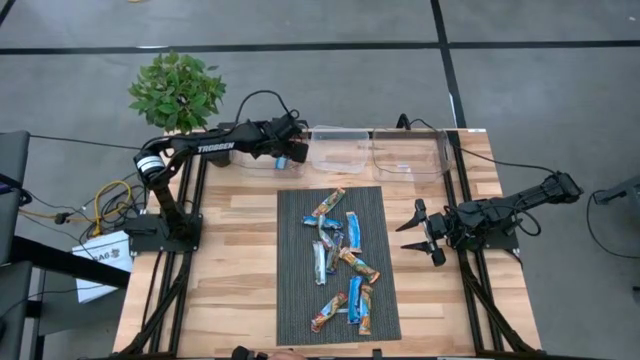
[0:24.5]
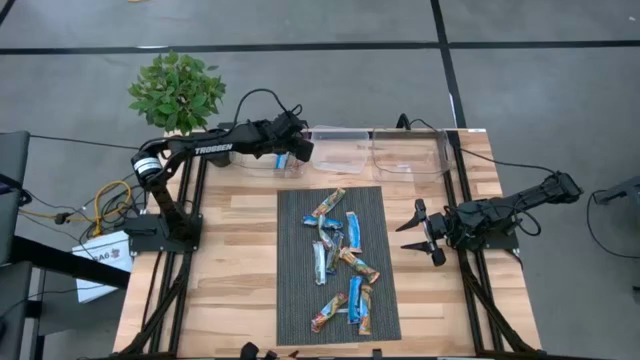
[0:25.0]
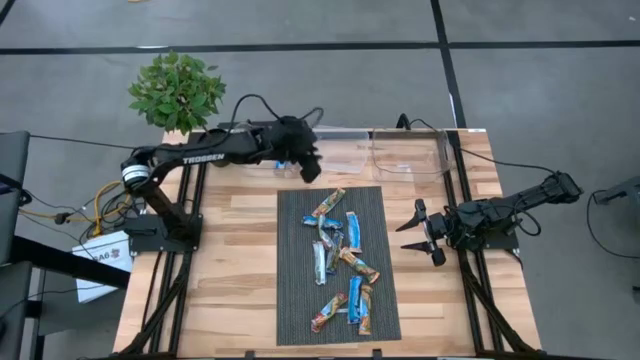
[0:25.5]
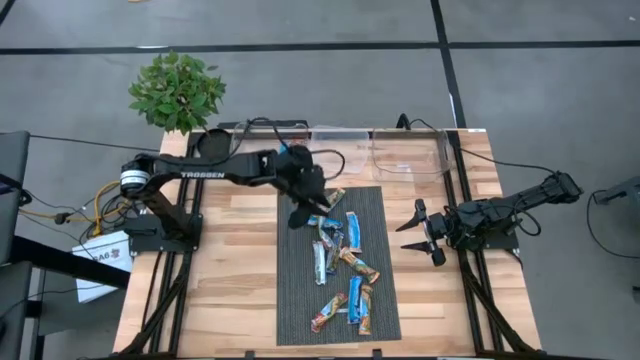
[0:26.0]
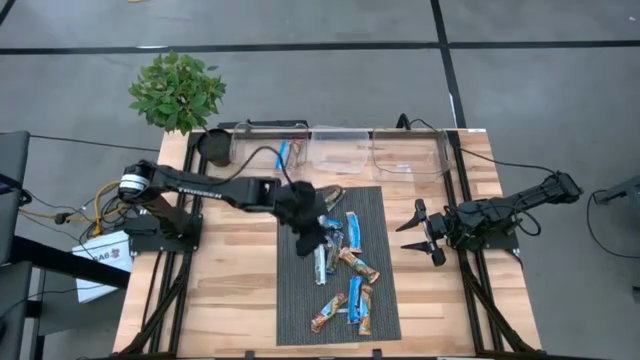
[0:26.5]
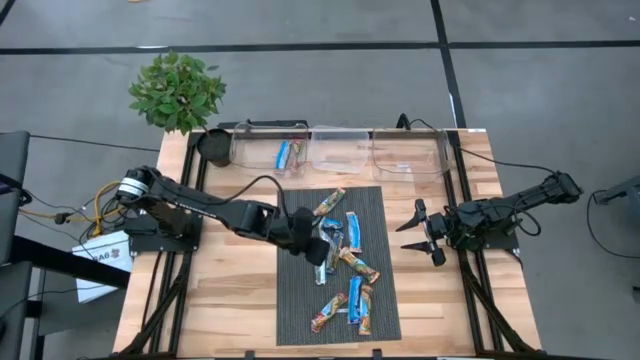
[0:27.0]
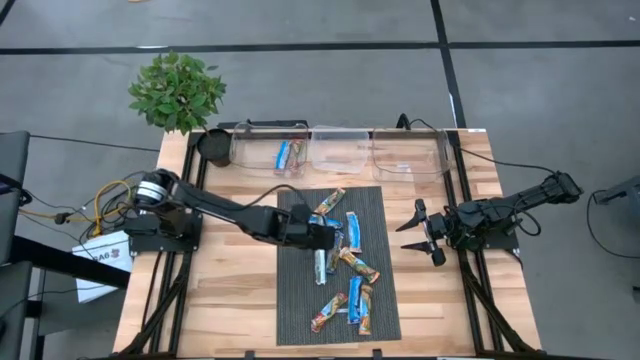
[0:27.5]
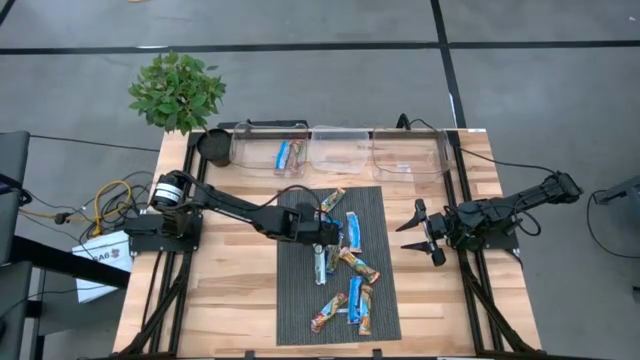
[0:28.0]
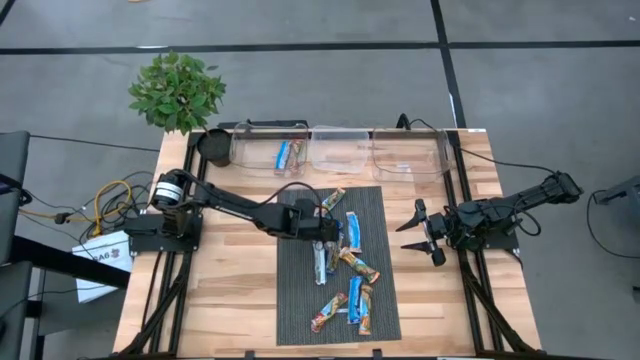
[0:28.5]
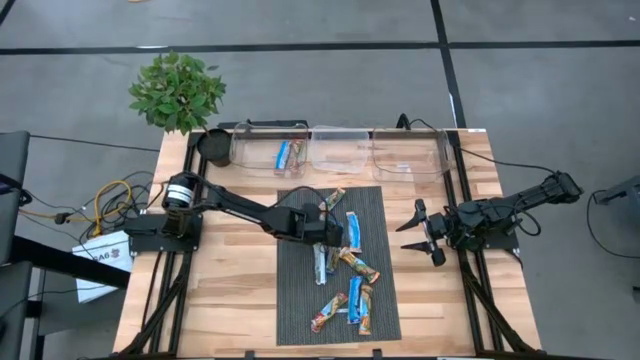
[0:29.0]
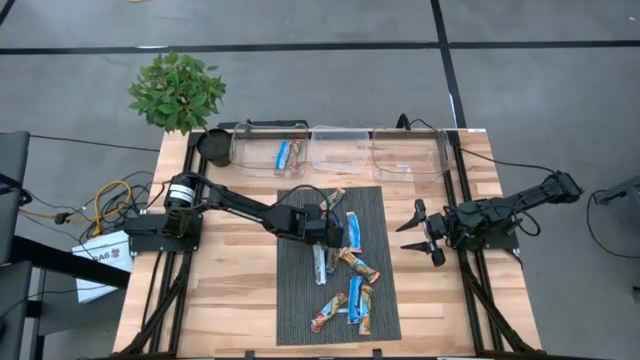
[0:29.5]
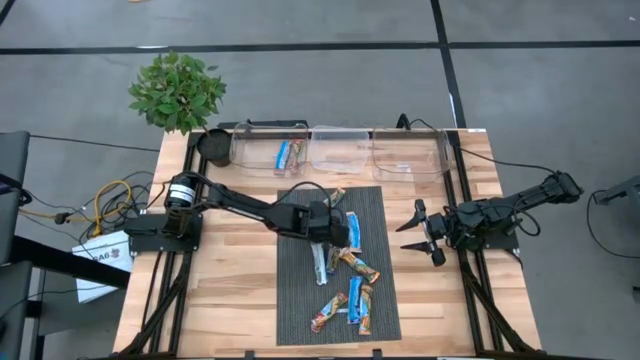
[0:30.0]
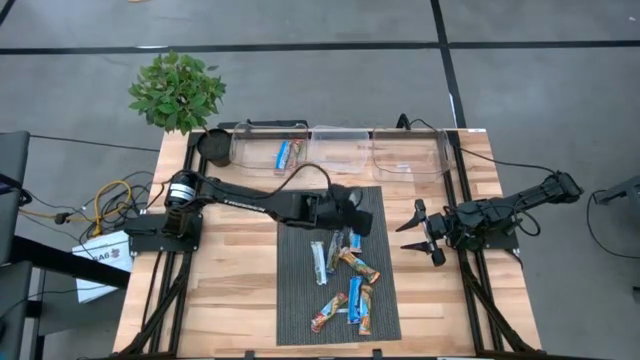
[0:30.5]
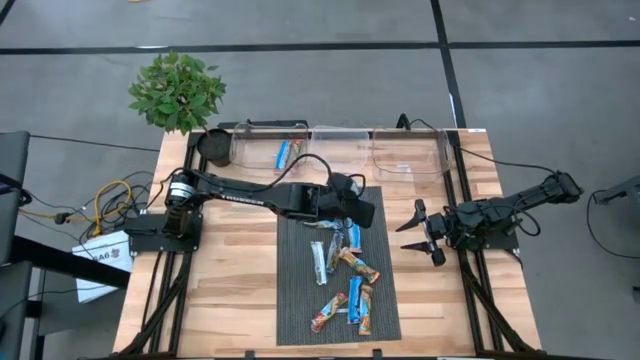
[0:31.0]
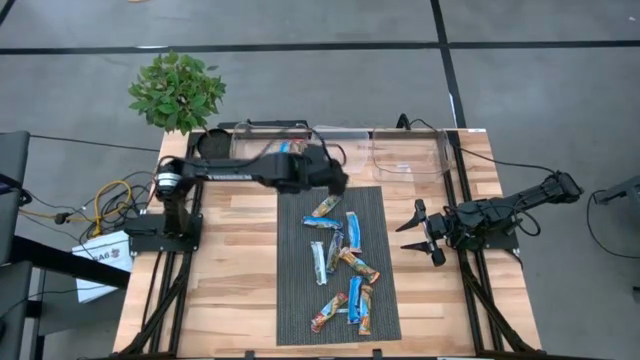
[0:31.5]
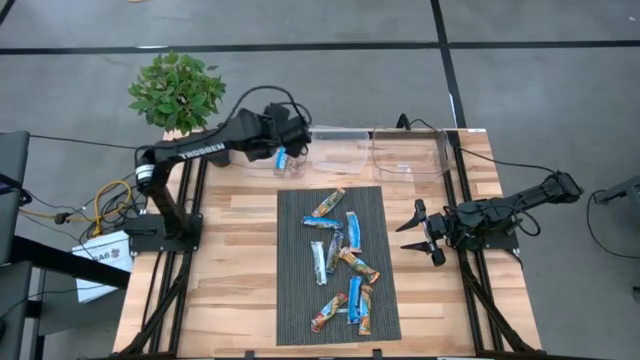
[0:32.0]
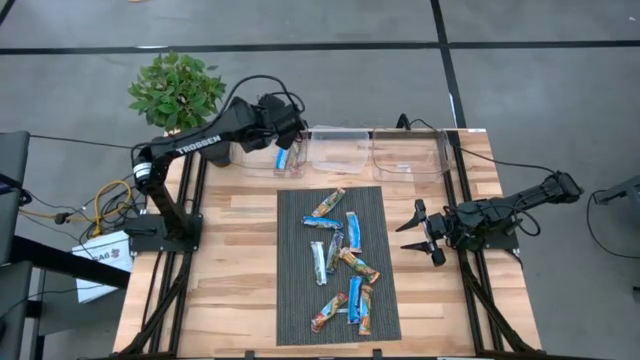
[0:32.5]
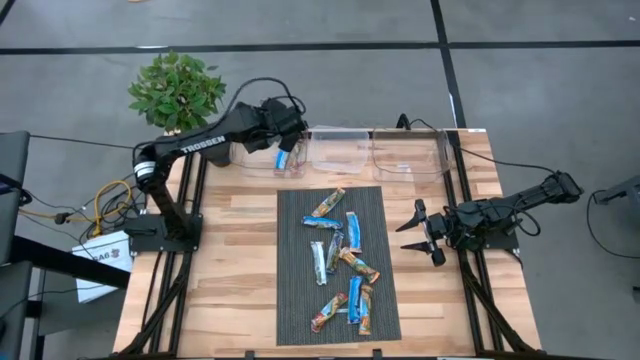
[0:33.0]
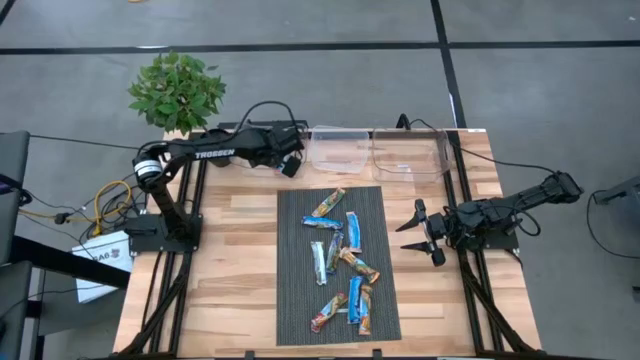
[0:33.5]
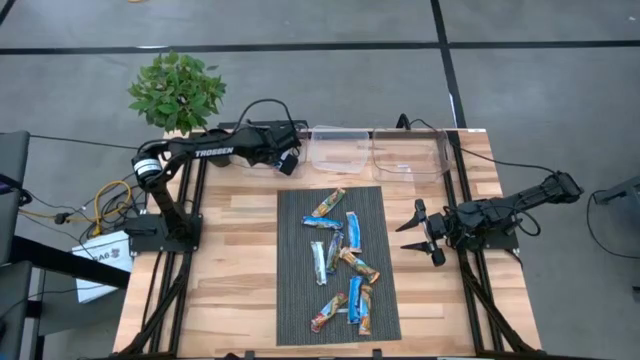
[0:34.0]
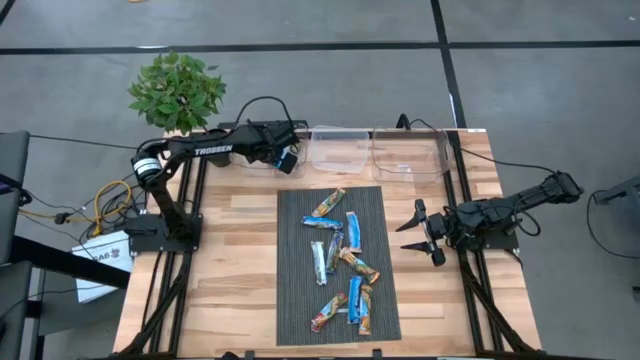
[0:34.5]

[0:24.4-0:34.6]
Task: Pick and place Granola Bars by type
Put the red granola bar into the left transparent bin

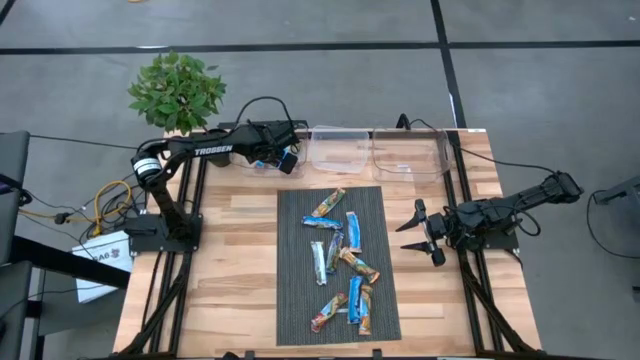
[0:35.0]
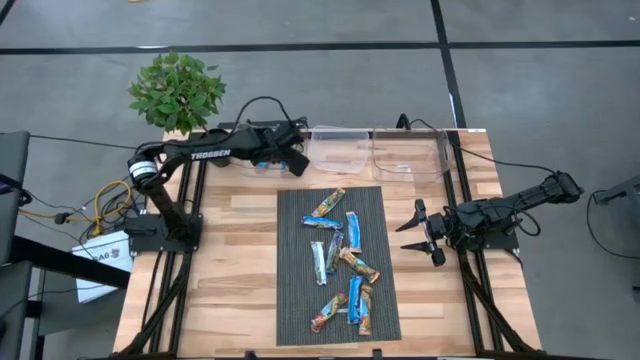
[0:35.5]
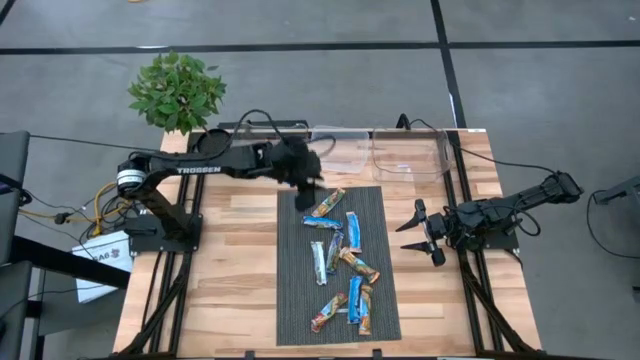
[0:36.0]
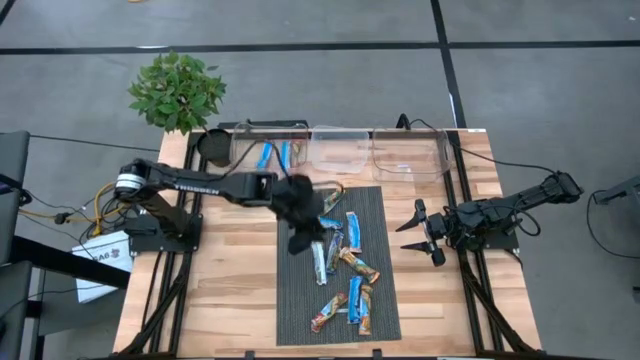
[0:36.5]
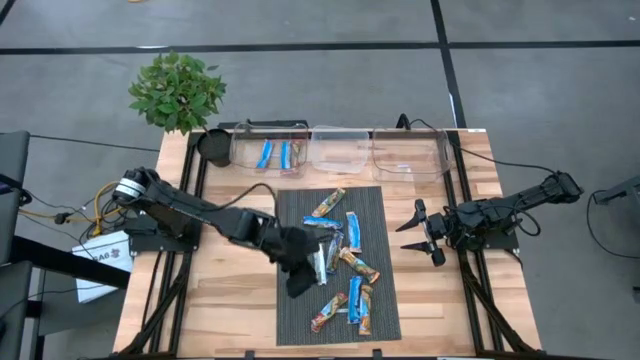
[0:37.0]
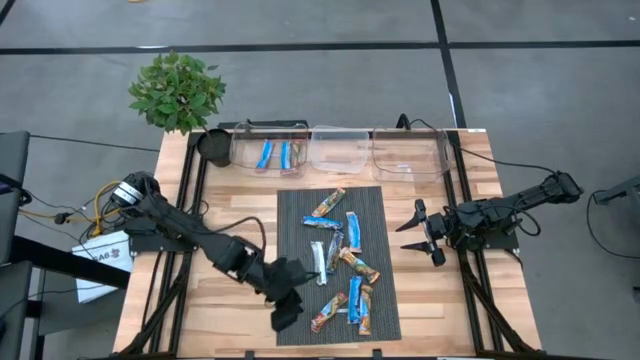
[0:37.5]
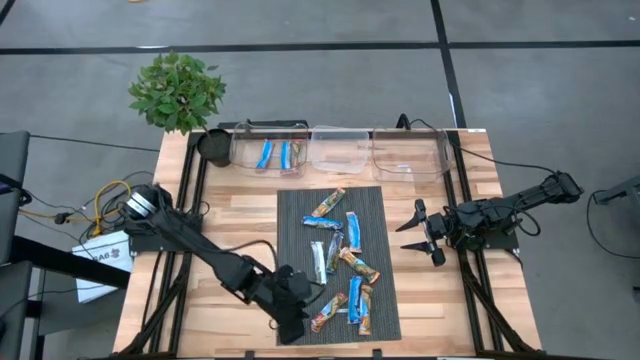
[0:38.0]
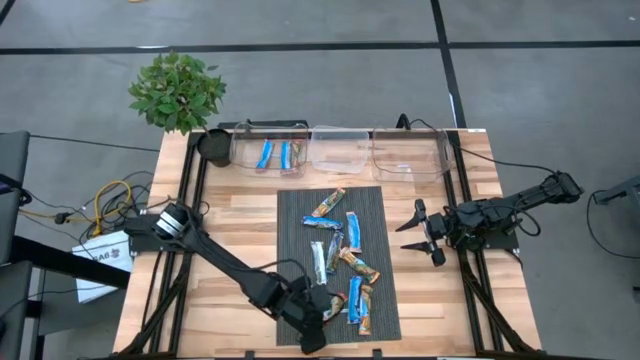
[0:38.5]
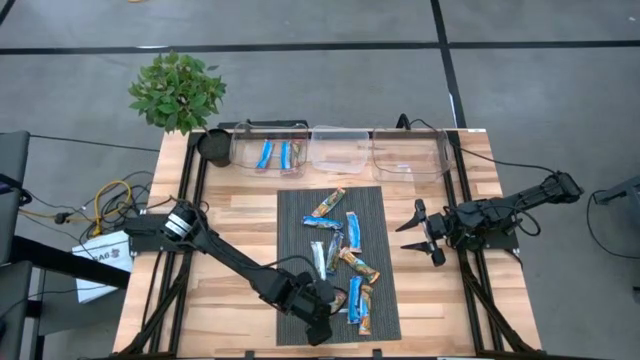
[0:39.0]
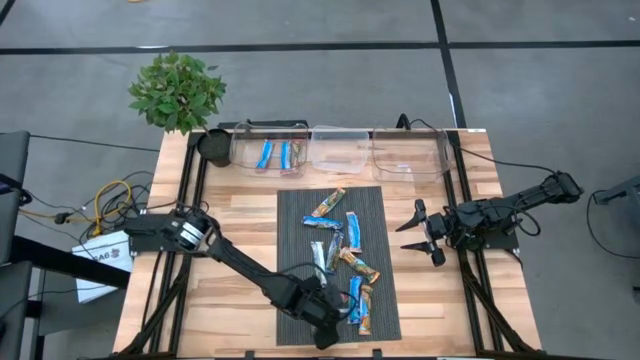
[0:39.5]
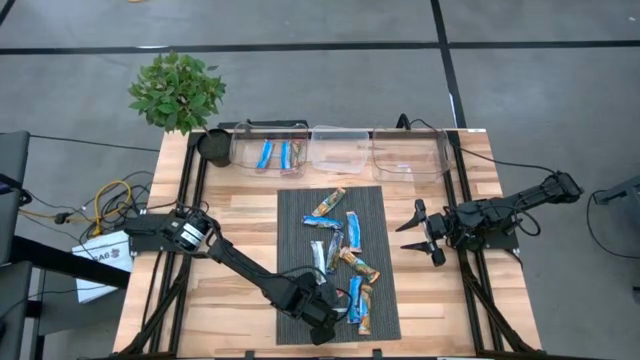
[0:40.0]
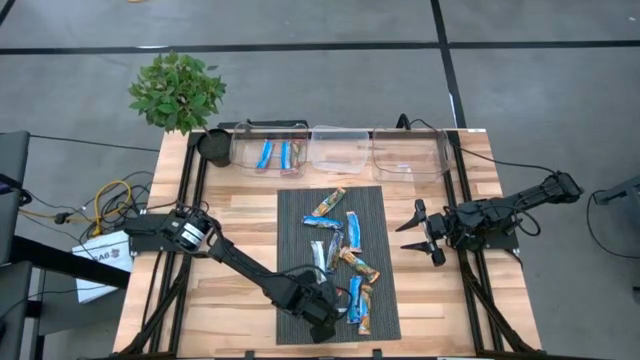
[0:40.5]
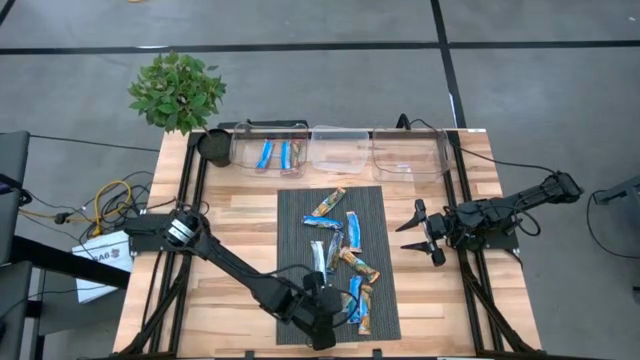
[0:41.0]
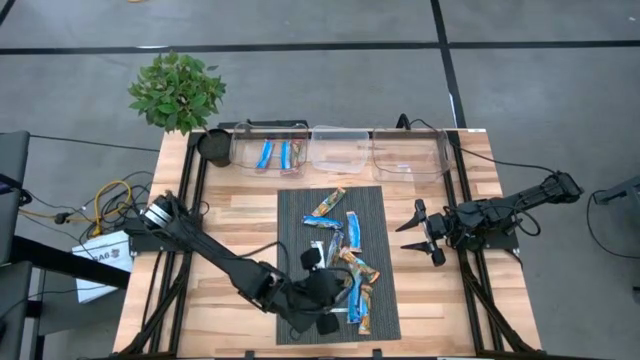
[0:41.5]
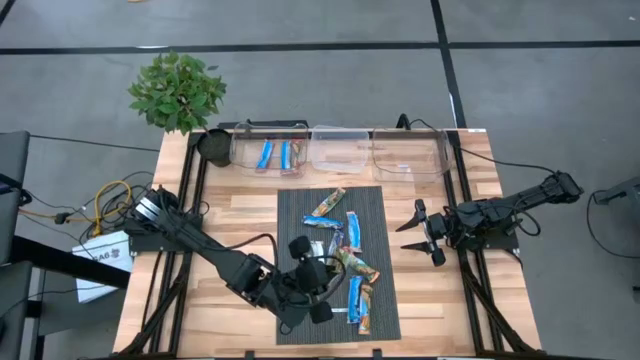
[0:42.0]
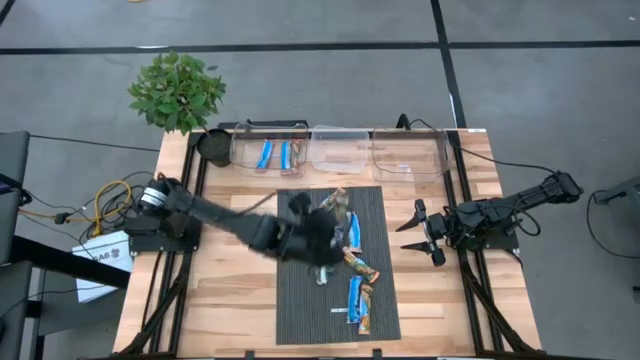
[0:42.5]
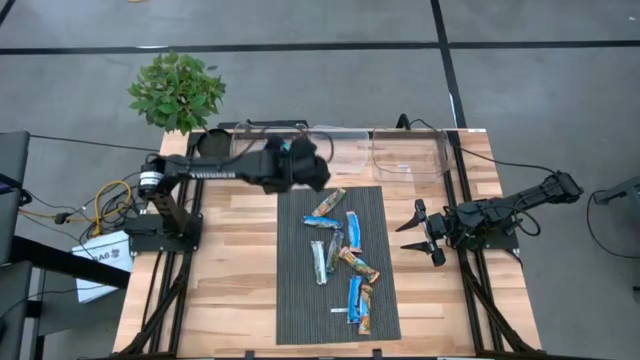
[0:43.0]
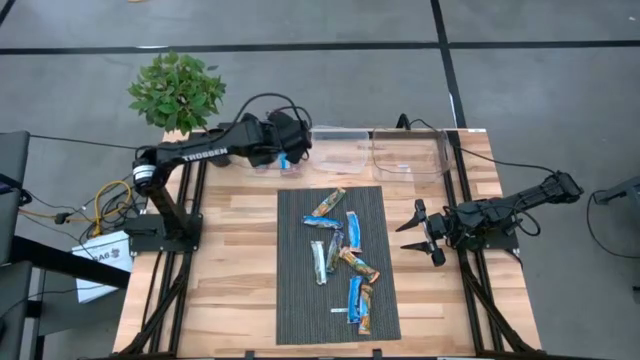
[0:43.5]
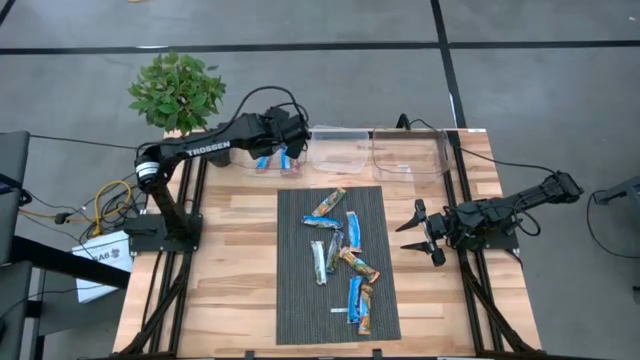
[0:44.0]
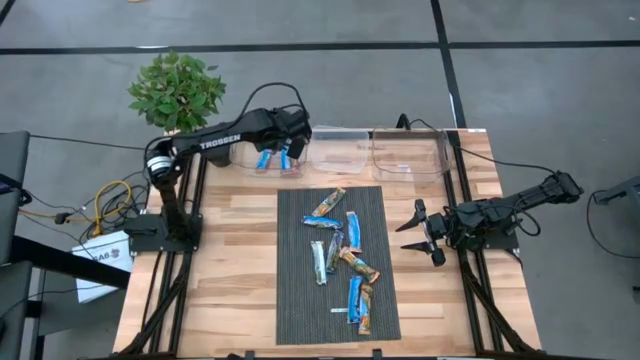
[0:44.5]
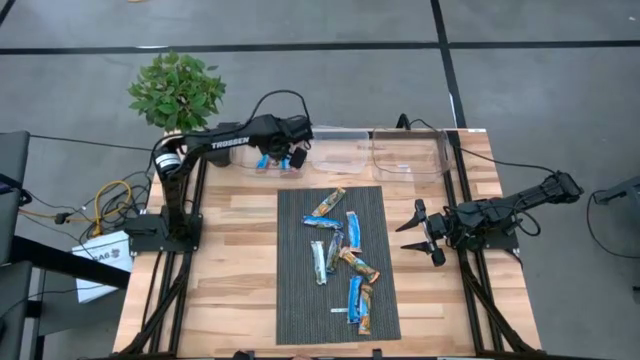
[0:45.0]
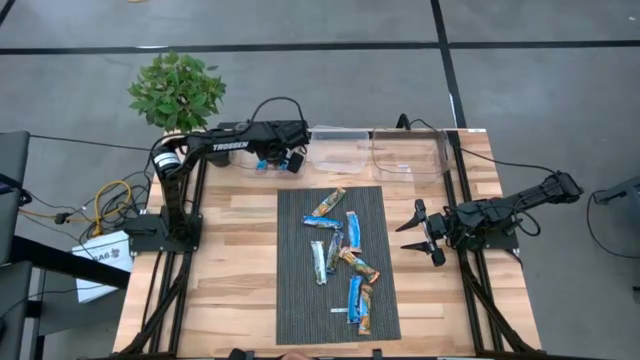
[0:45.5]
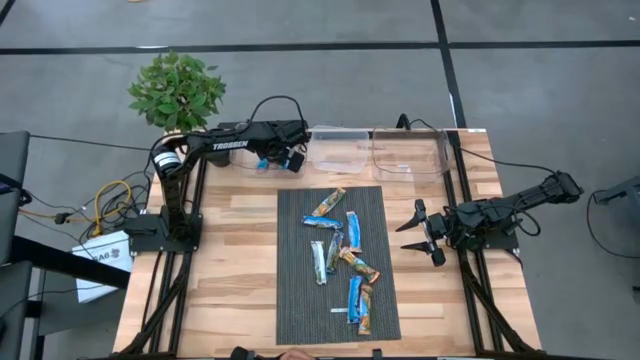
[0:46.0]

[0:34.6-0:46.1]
Put the red granola bar into the left transparent bin
